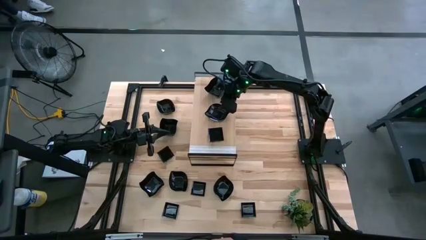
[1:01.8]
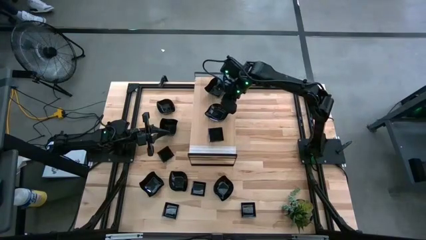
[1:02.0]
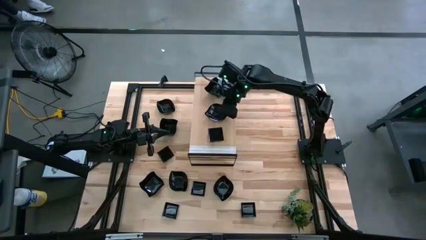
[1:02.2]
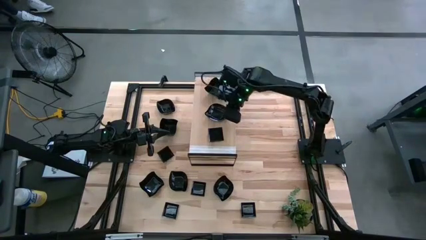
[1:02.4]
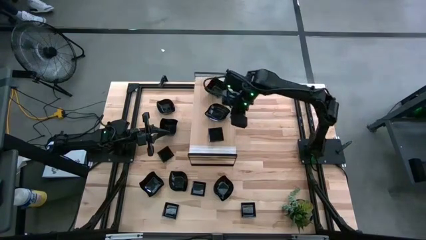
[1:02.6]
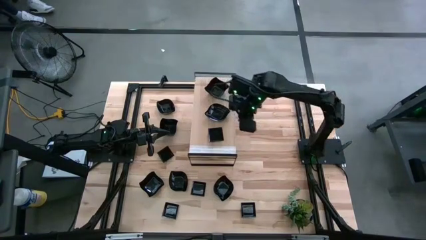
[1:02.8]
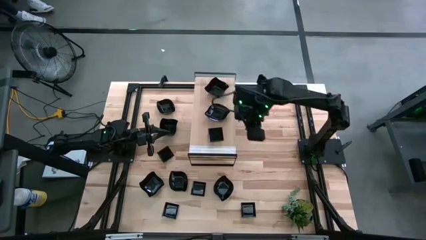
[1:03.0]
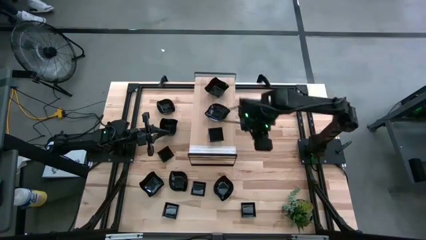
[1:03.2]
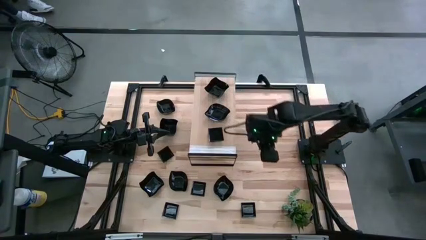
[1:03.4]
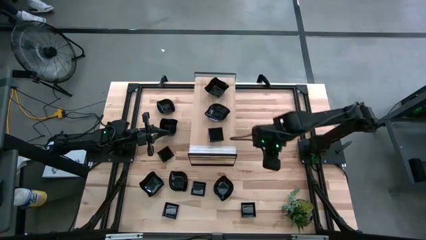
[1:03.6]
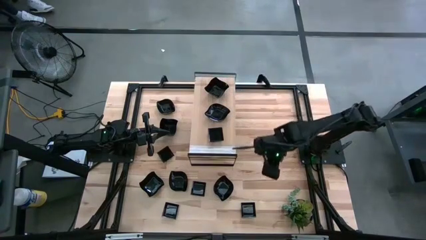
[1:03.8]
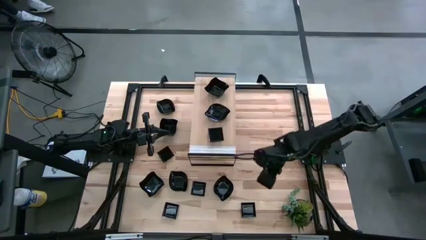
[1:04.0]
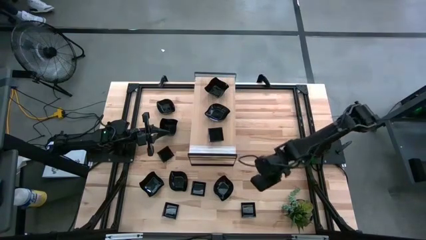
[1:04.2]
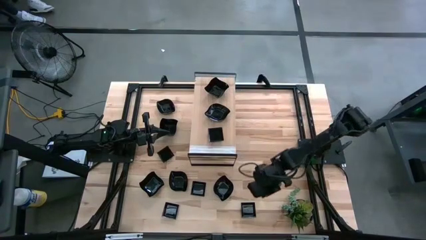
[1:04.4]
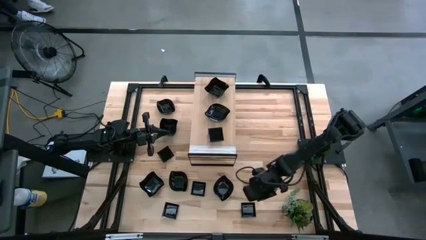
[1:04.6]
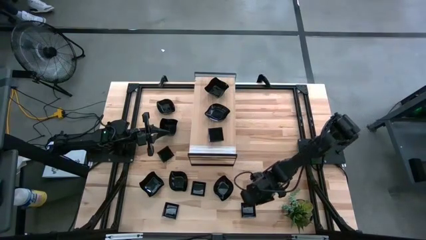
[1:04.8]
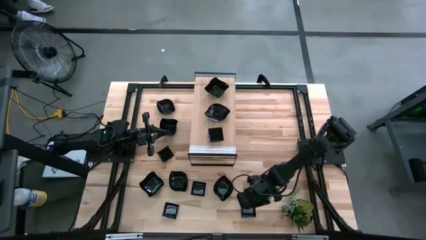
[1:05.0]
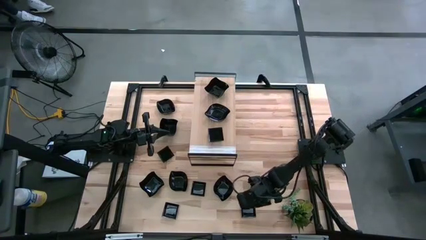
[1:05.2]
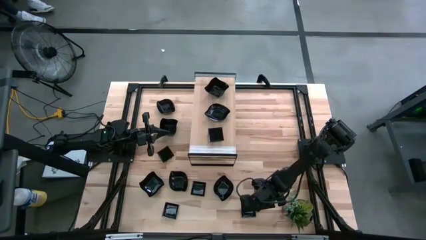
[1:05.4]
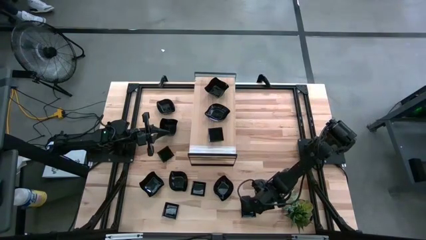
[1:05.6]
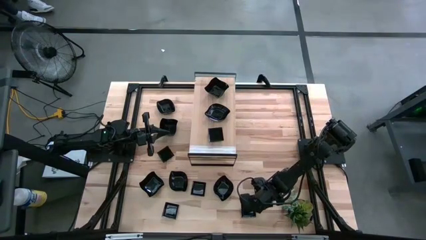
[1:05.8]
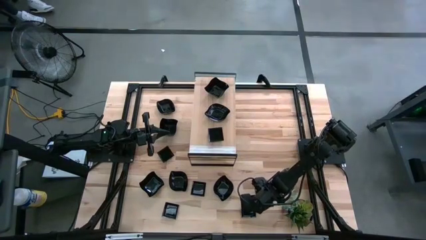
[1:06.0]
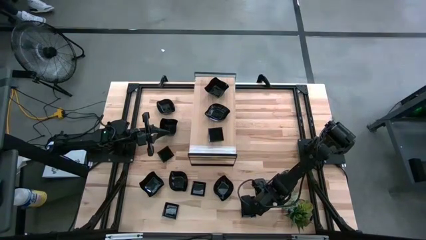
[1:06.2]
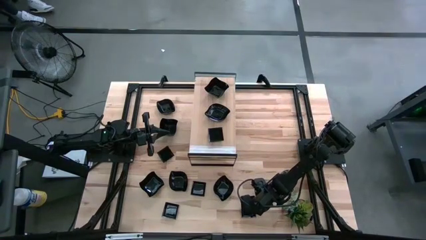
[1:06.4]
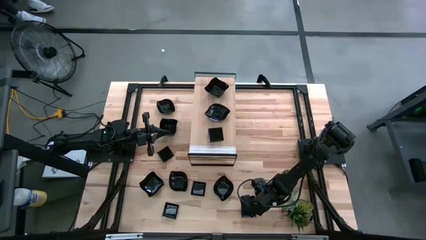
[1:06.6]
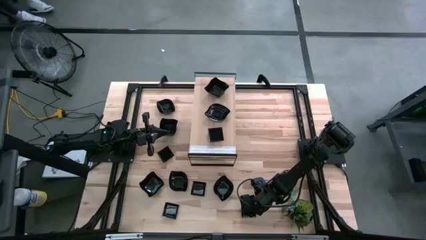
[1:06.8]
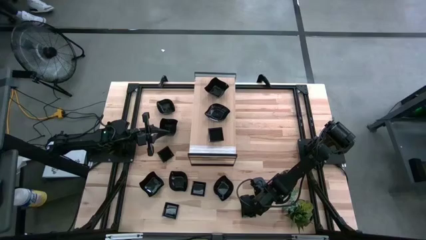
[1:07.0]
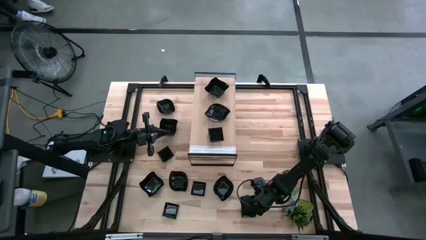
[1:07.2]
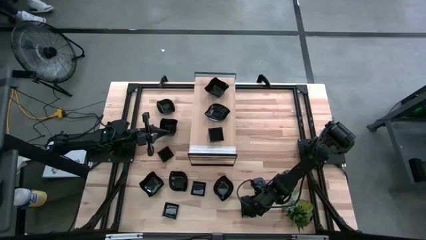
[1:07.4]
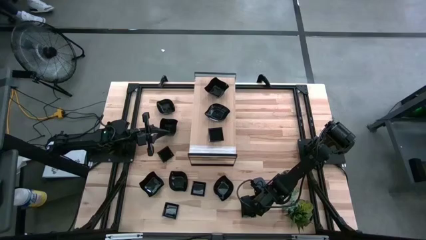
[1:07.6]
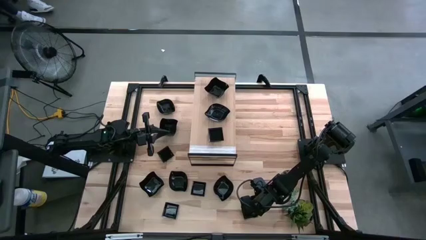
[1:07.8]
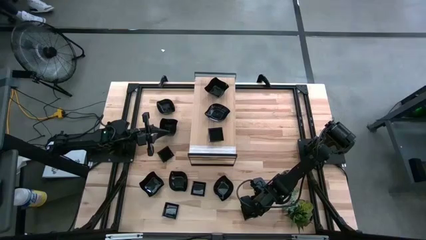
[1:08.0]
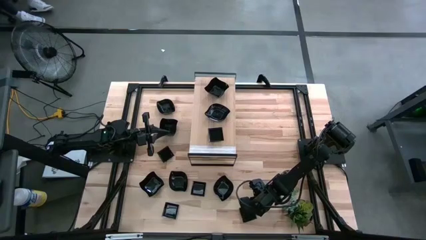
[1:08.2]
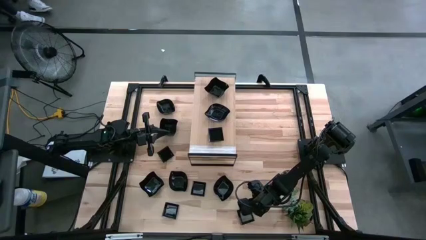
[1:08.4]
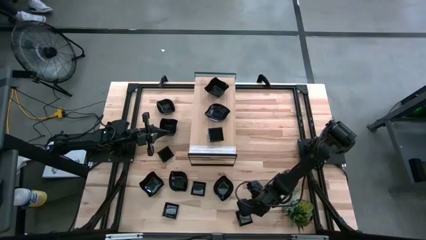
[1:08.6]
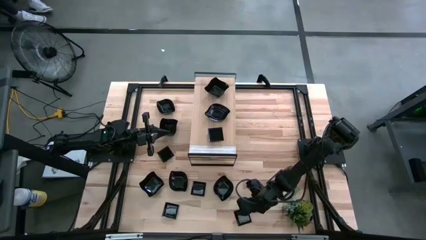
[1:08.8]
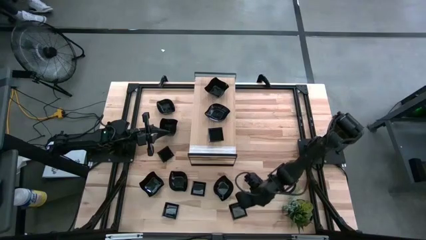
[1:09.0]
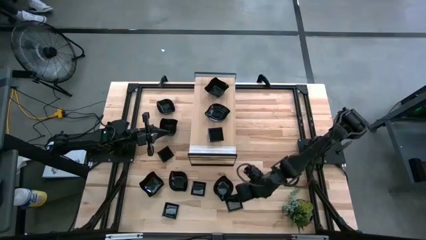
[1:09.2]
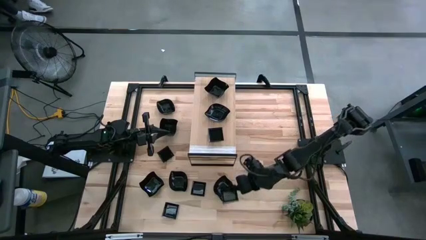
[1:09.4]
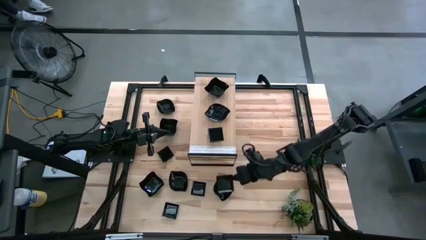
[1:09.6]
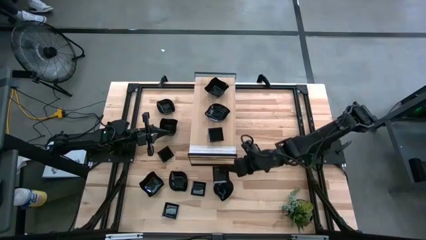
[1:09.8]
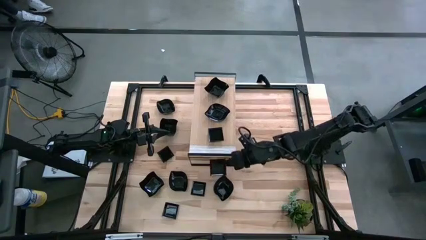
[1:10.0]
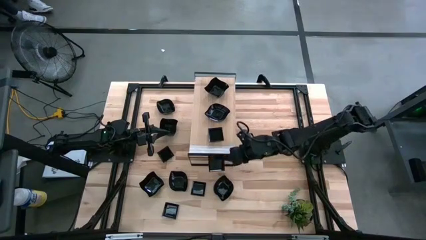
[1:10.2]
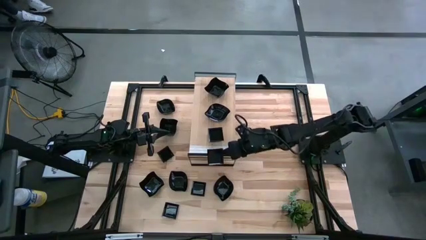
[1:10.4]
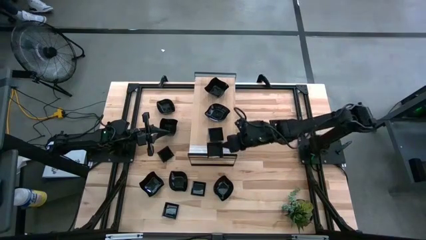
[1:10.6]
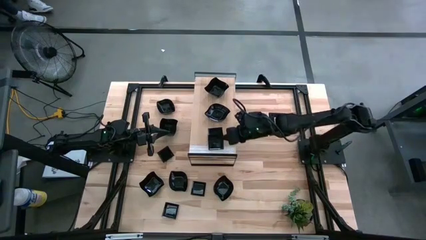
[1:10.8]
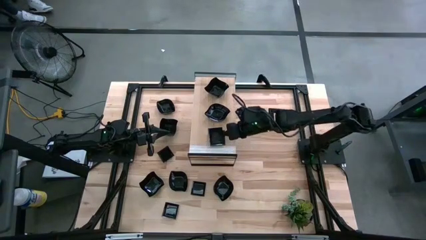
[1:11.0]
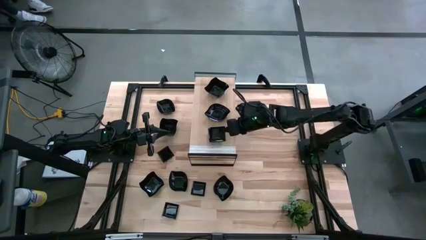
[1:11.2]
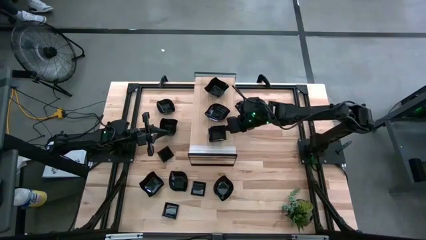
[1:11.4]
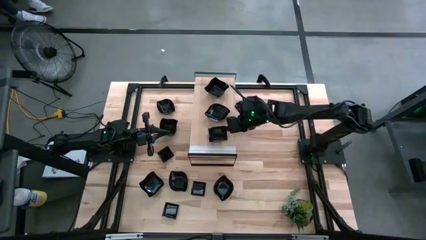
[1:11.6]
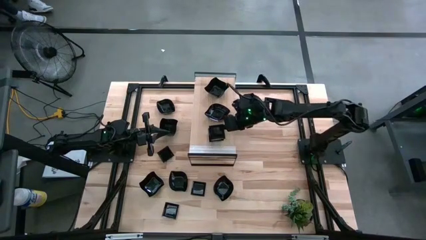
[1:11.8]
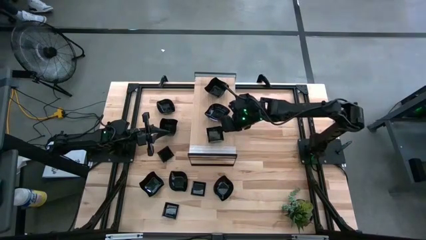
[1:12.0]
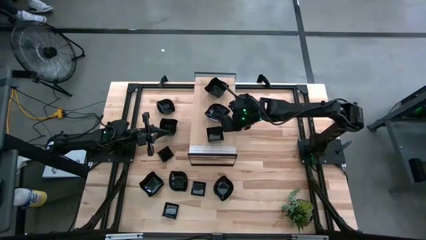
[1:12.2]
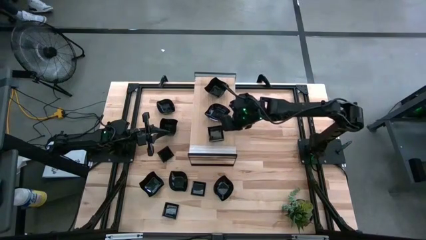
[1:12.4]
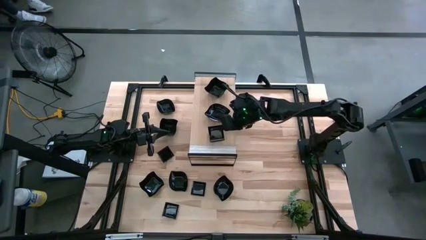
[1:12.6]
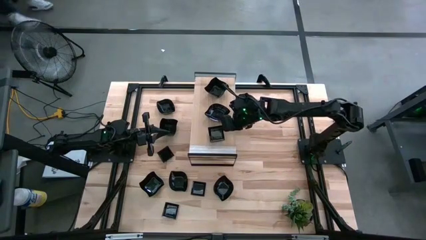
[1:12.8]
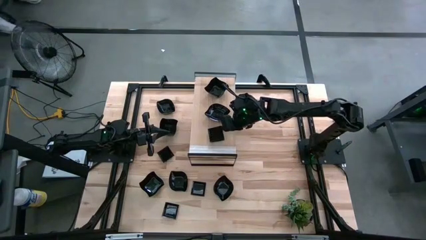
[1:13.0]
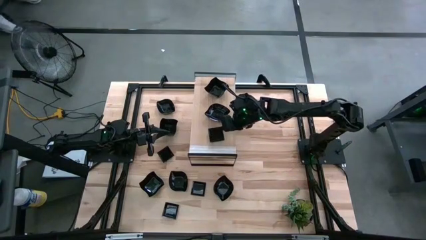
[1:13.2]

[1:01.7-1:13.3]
Task: Pick & Place Mini shaped plates
Stack the square-shaped plate on top of the square-shaped plate on the shelf

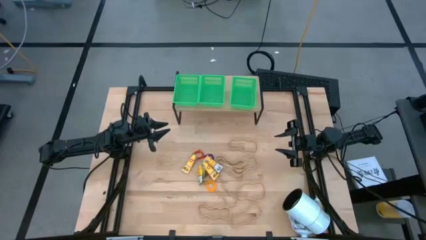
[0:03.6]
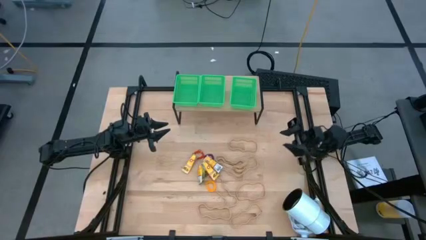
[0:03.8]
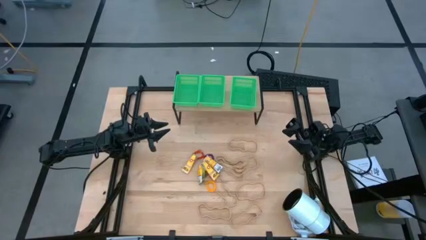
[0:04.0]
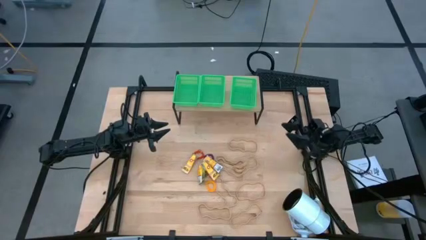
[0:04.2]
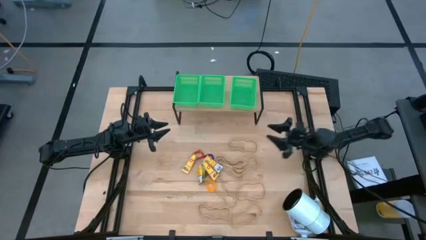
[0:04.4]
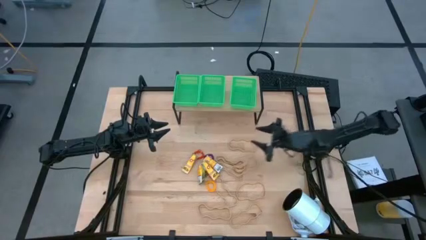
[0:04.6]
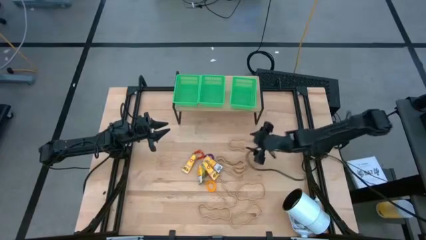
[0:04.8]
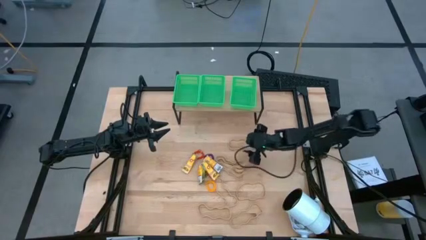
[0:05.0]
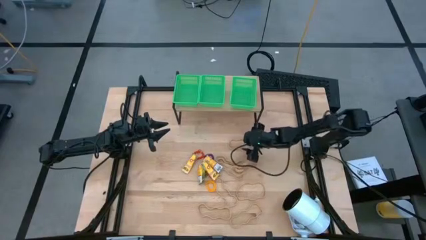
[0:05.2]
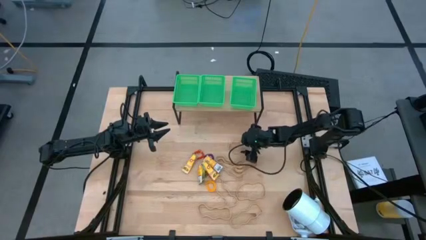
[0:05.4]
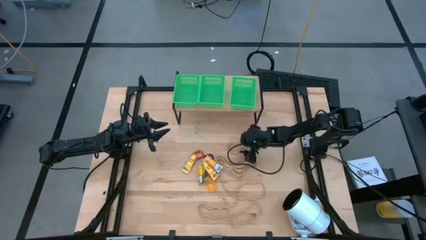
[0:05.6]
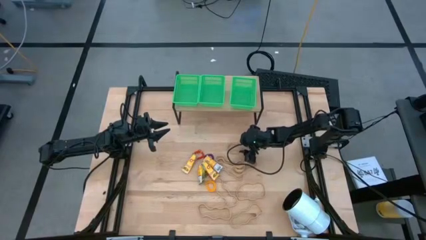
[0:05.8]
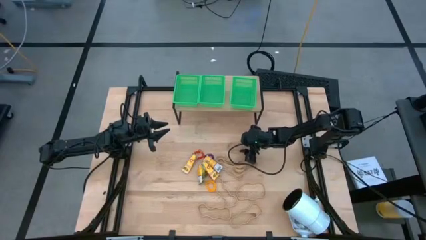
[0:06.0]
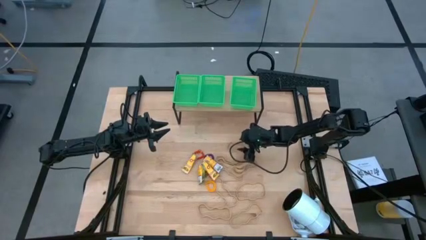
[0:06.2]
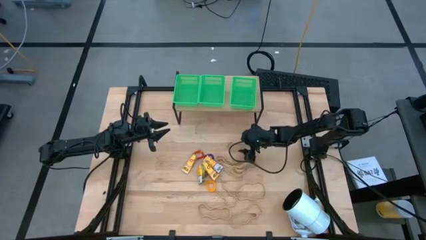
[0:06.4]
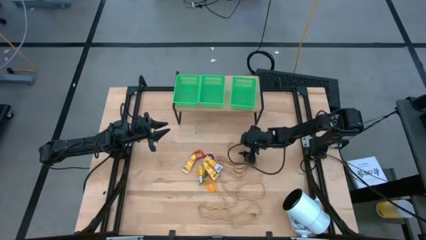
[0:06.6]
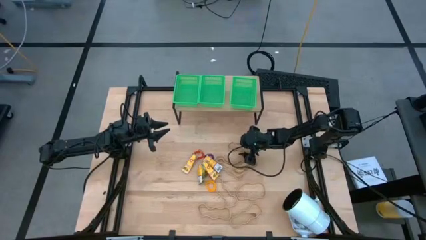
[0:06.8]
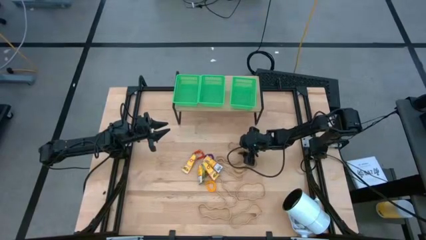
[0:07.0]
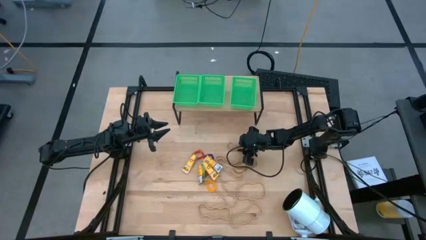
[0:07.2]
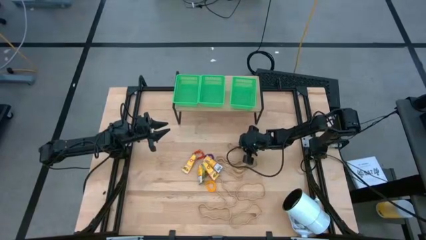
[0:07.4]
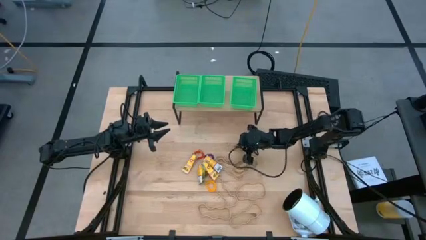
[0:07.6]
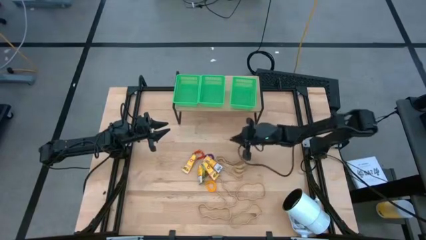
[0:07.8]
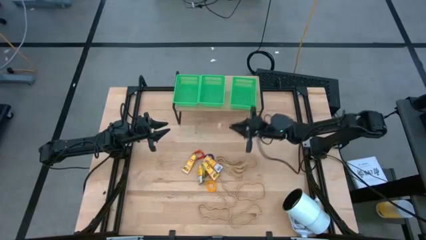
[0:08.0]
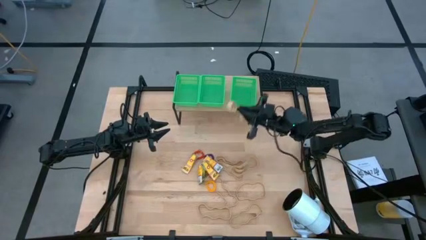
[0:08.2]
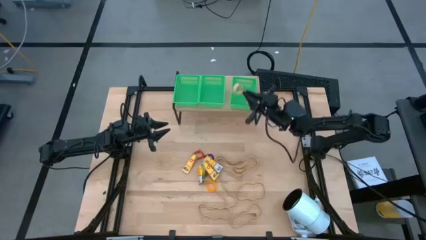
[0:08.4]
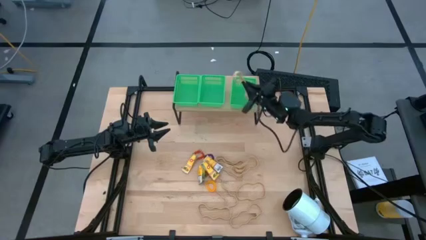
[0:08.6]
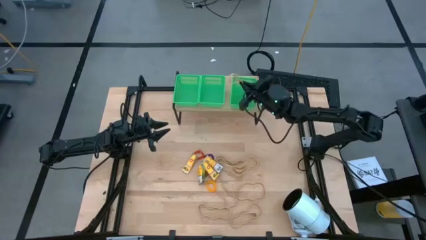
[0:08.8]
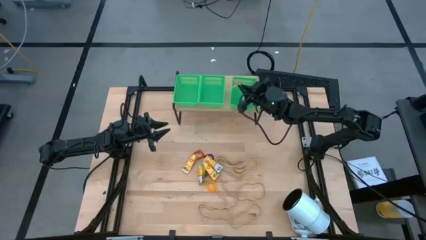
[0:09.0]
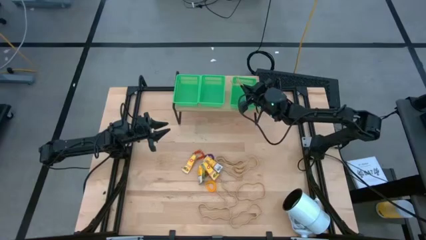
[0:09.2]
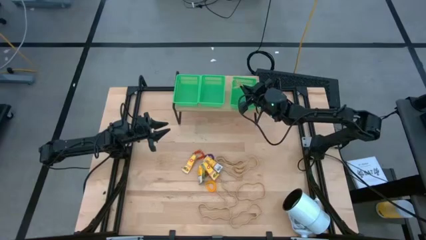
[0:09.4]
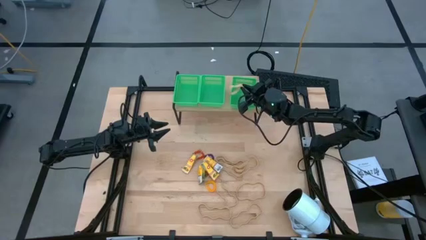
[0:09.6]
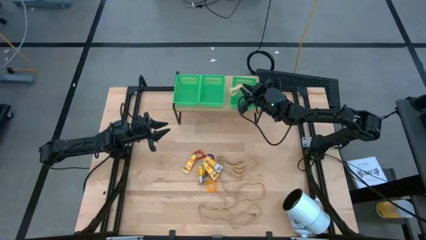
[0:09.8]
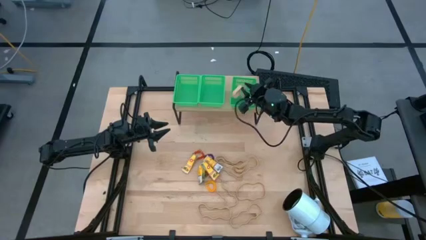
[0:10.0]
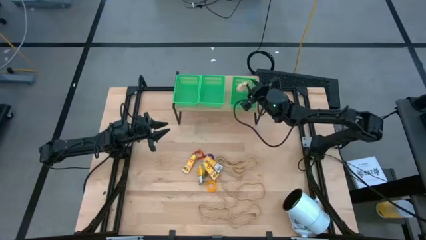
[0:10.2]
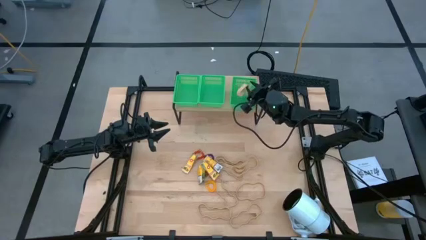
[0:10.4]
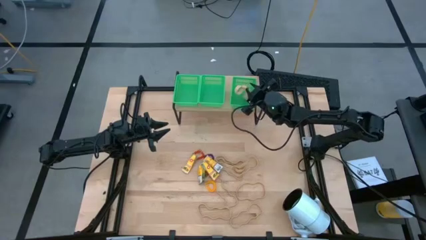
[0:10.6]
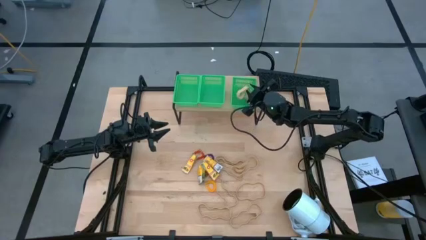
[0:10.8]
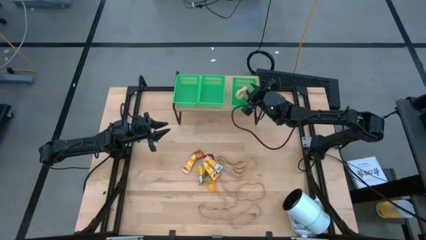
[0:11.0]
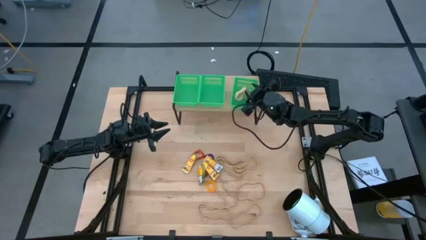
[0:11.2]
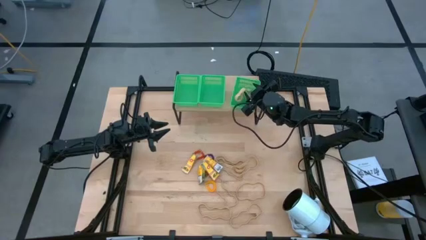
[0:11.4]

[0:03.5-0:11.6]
Task: Pick & Place Office Desk Supplies
Put the brown rubber band into the right green bin on the shelf
